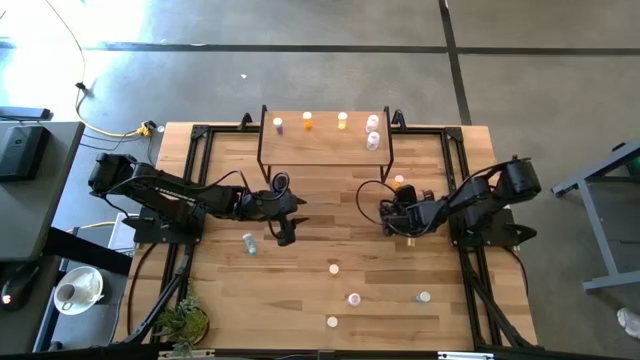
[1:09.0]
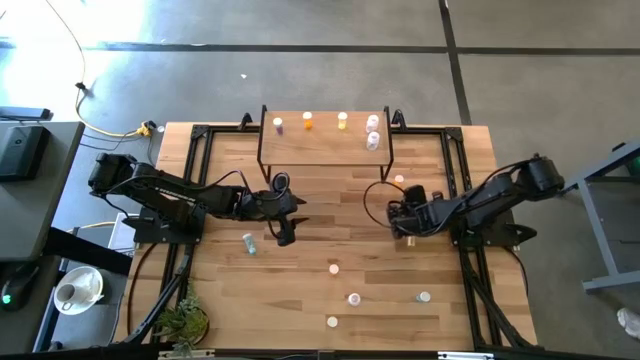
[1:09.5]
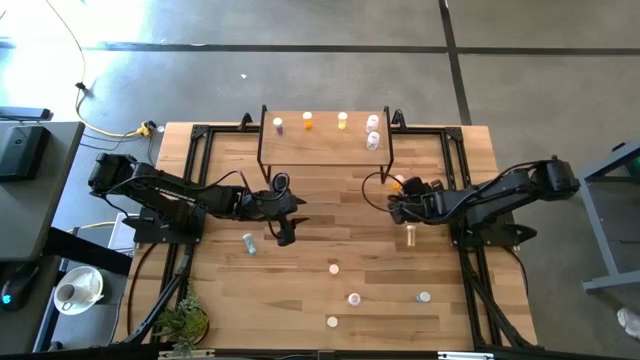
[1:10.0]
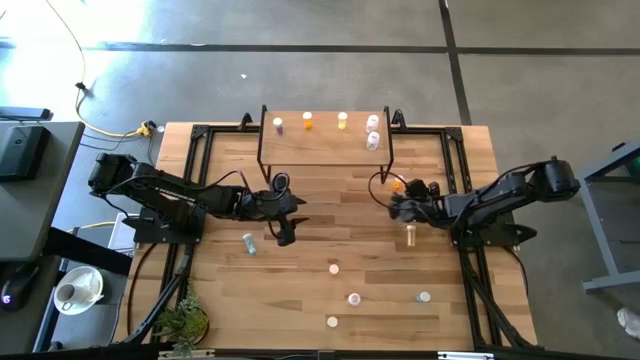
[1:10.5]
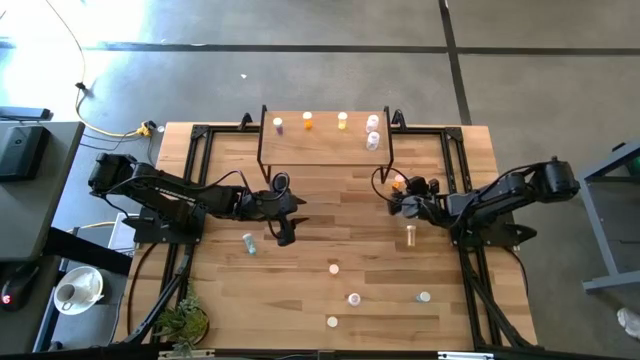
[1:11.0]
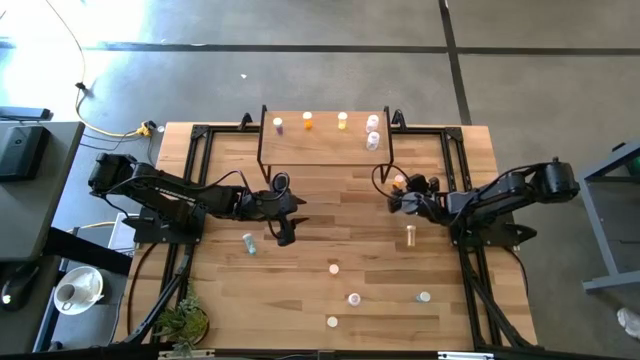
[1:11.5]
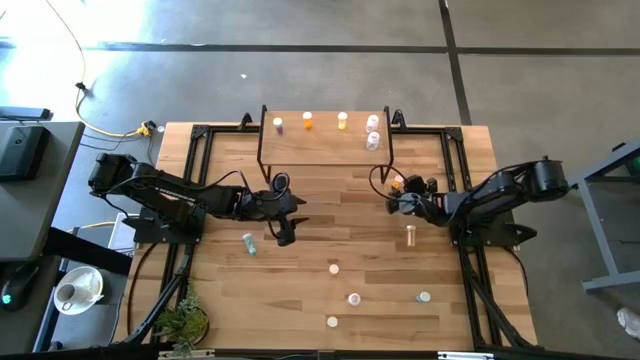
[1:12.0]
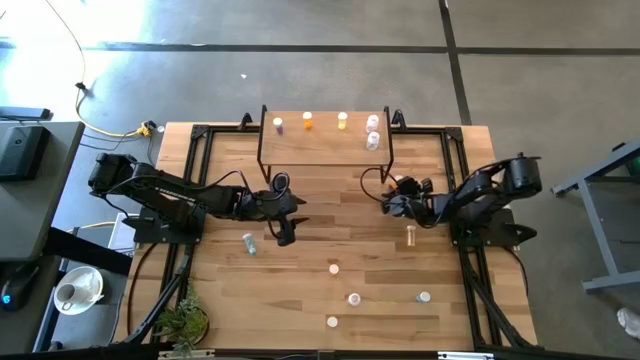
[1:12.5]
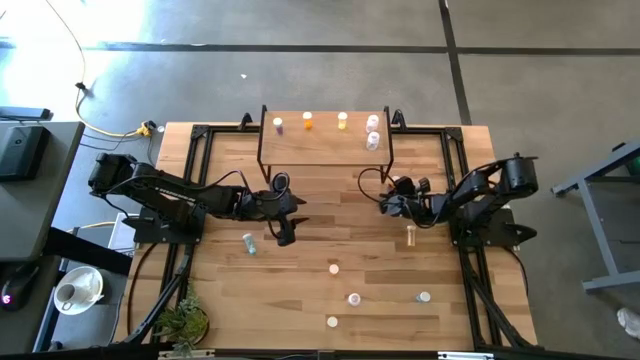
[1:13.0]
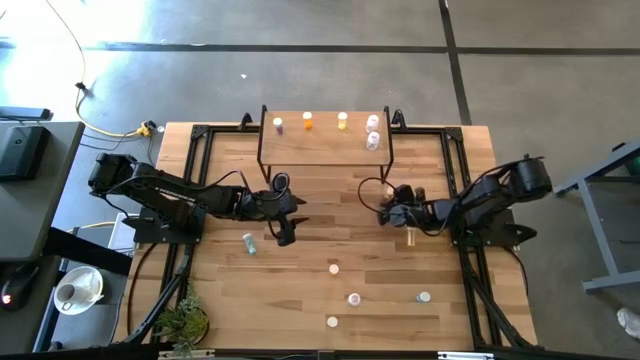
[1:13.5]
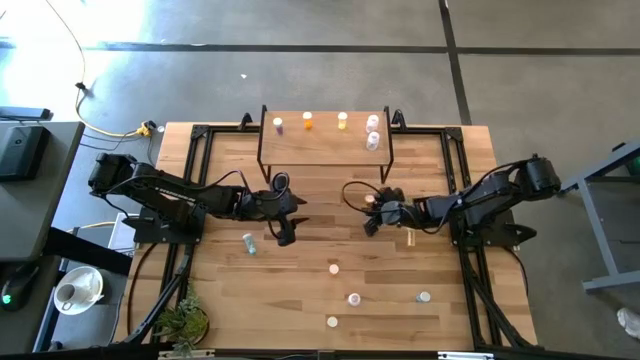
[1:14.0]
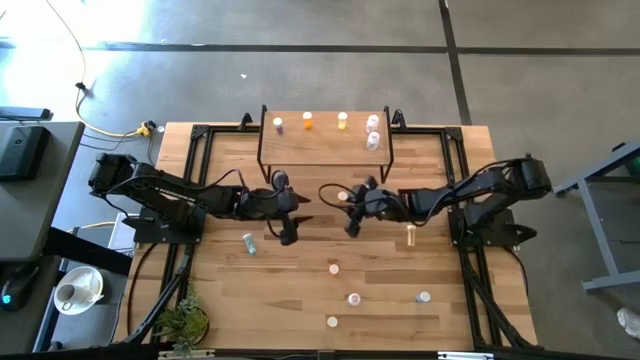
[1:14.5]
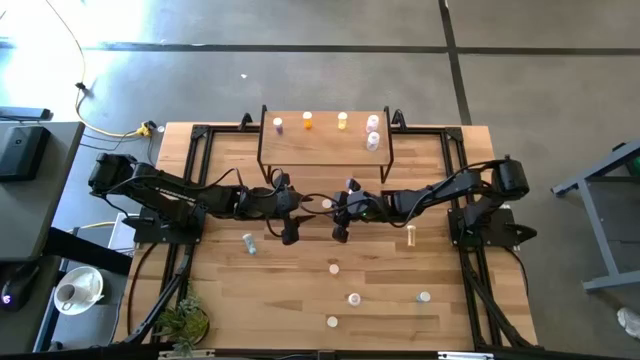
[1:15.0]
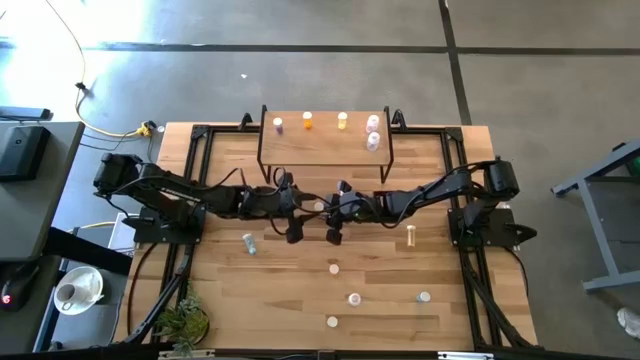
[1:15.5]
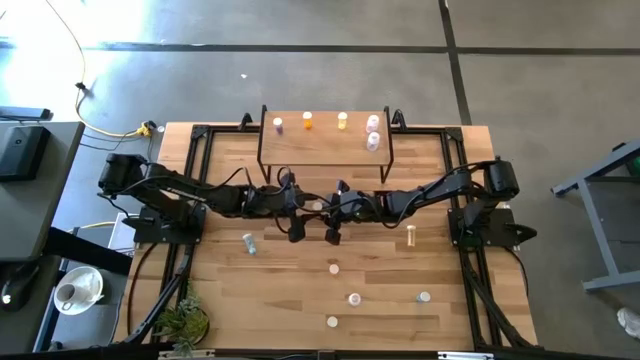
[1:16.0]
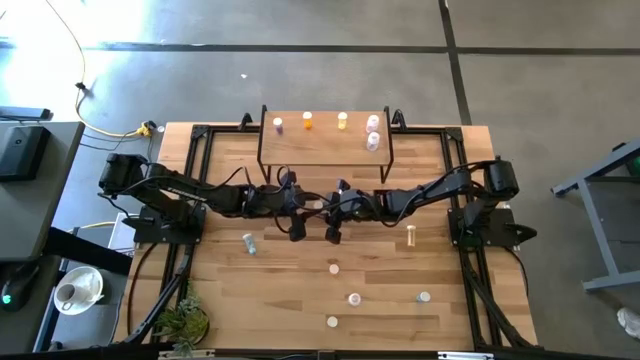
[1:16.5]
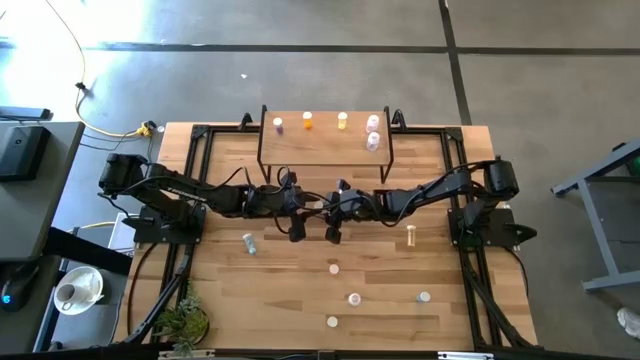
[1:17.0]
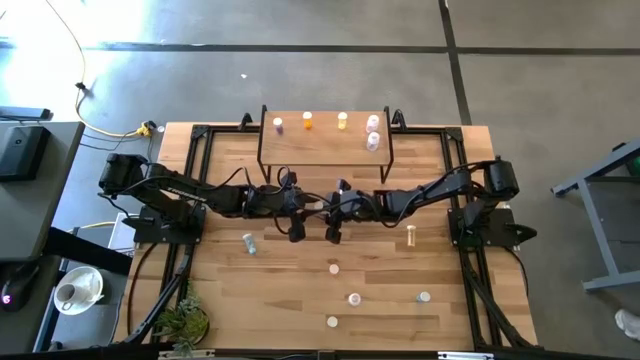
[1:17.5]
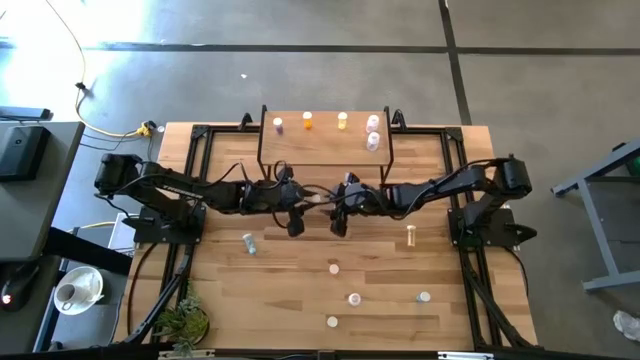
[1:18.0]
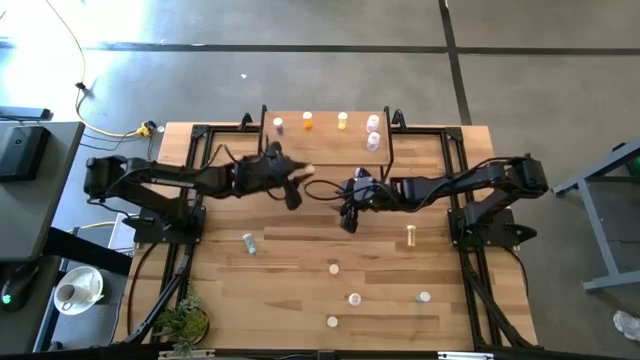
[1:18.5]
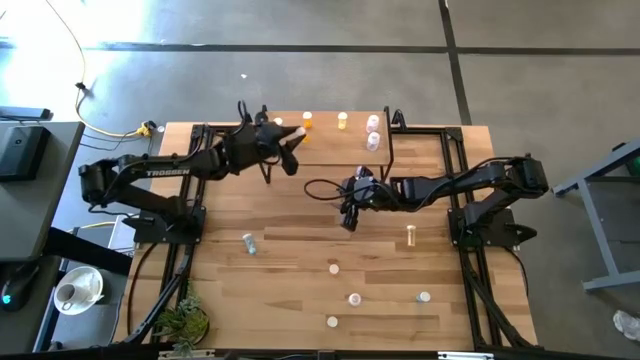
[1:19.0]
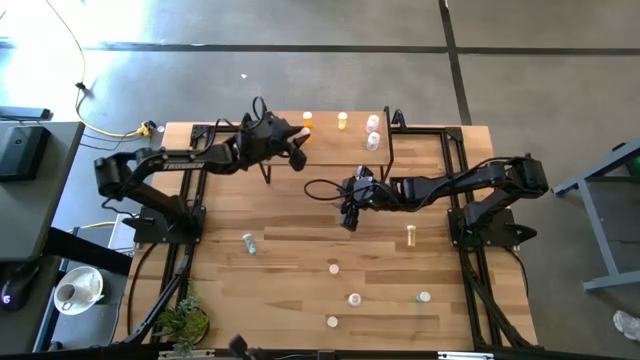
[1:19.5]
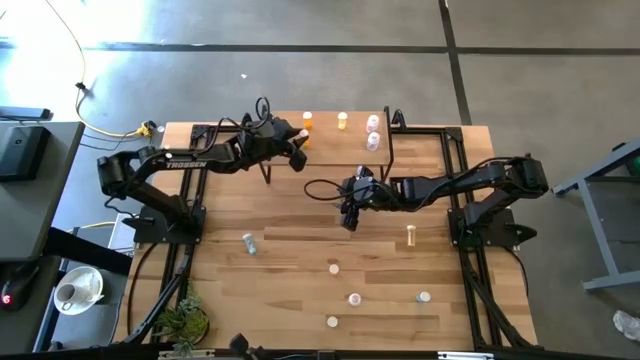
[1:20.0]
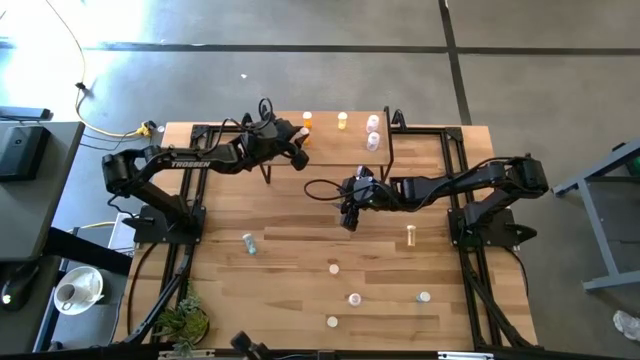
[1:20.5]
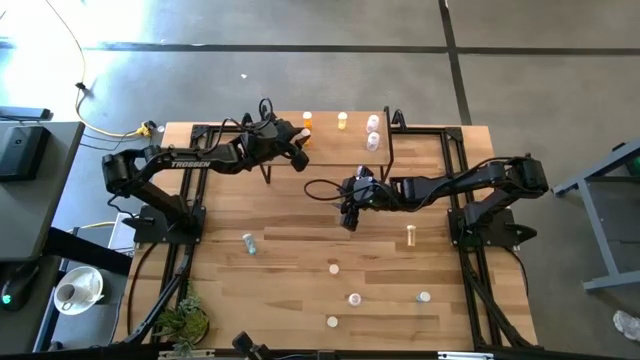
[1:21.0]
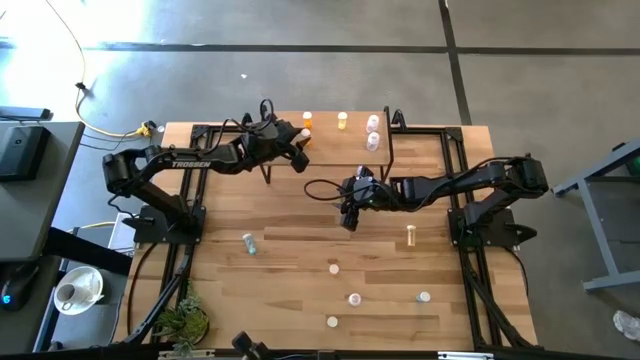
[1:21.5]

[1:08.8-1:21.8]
Task: Pick and place medicine bottles onto shelf by color
Put the top orange pill bottle on the shelf aligned with the other orange pill bottle

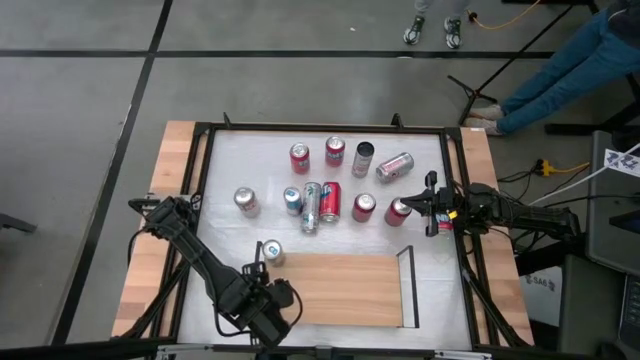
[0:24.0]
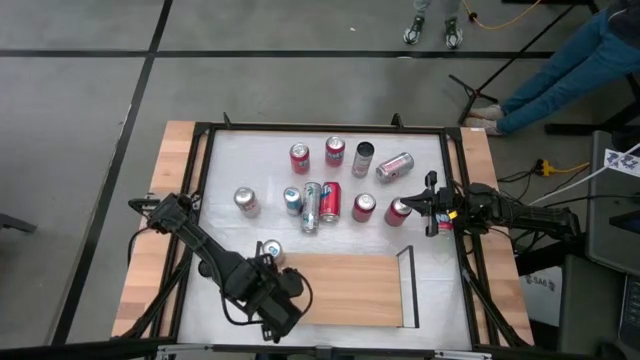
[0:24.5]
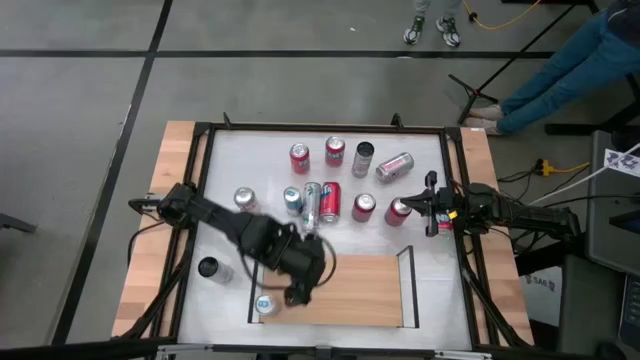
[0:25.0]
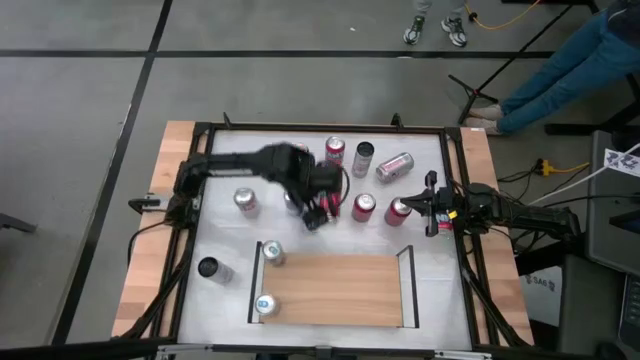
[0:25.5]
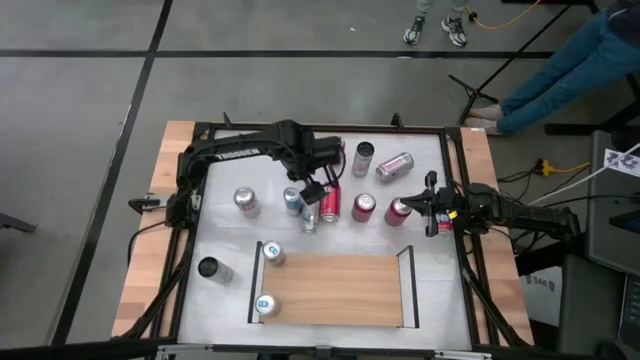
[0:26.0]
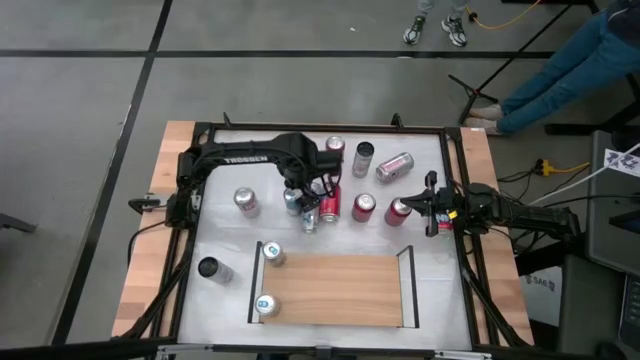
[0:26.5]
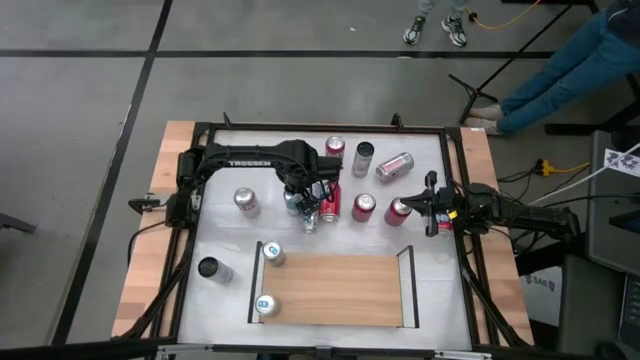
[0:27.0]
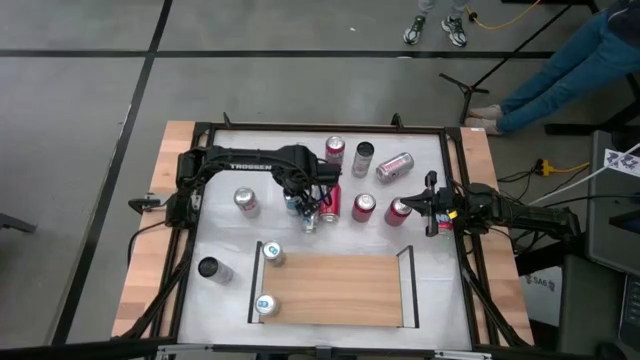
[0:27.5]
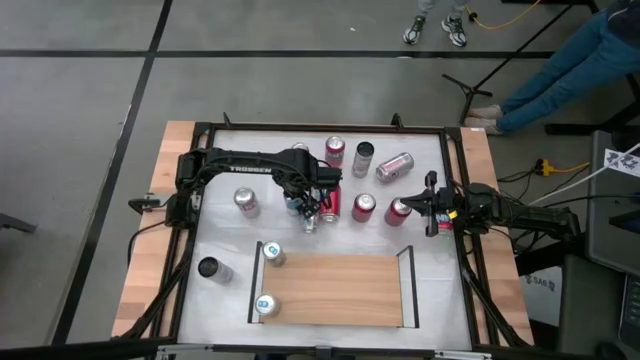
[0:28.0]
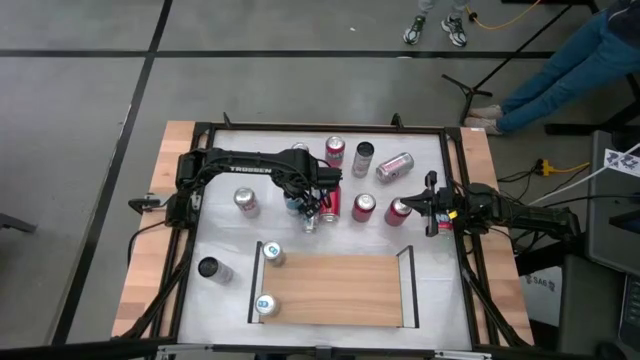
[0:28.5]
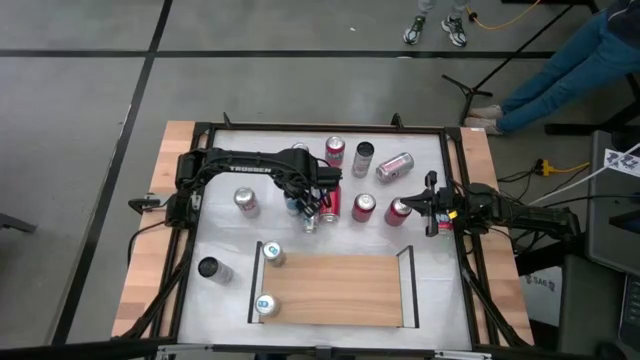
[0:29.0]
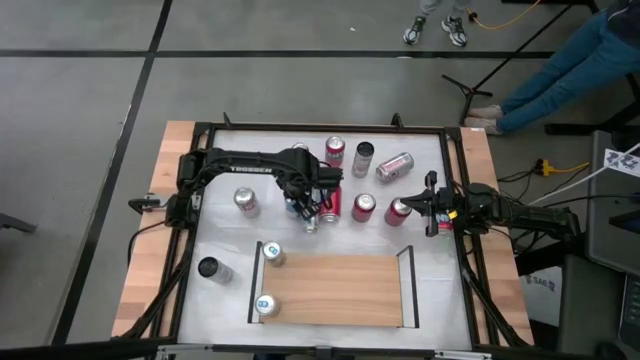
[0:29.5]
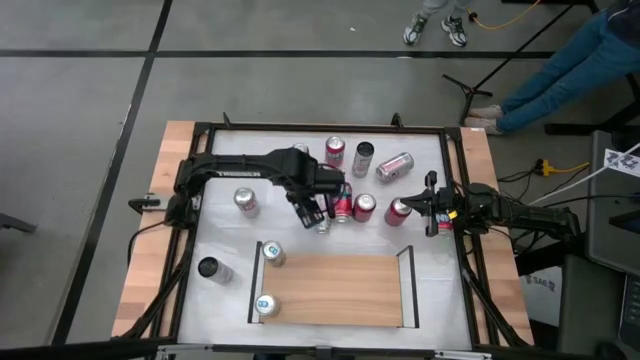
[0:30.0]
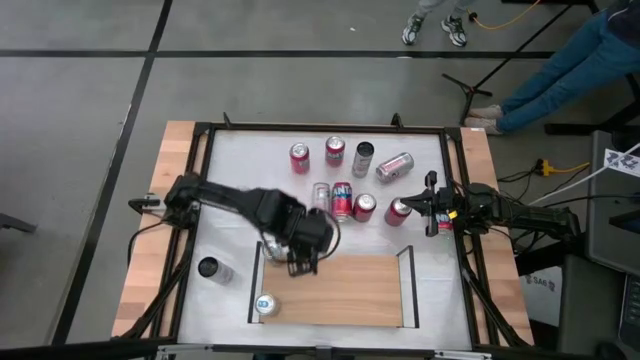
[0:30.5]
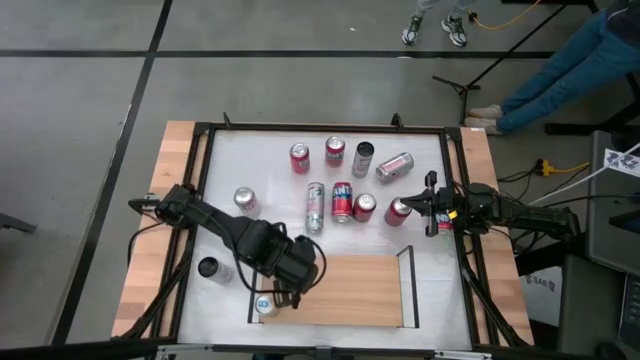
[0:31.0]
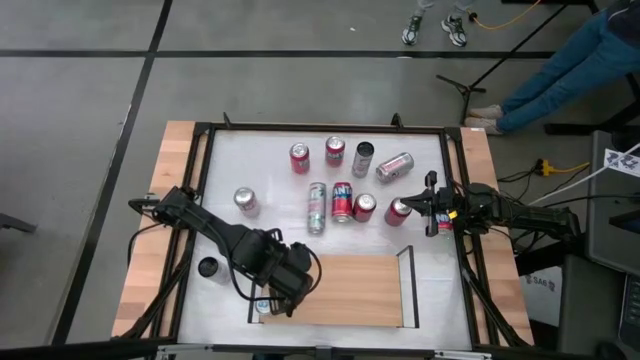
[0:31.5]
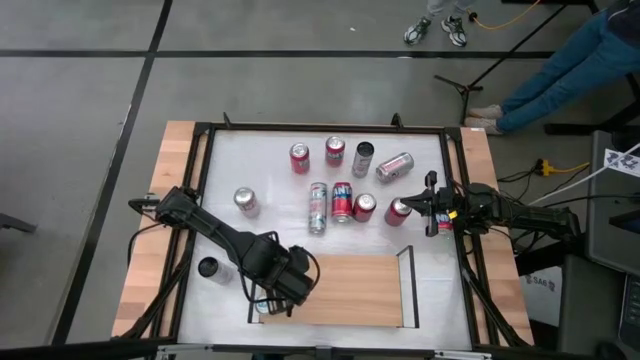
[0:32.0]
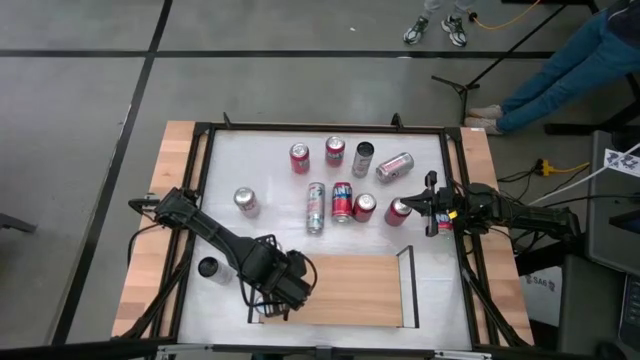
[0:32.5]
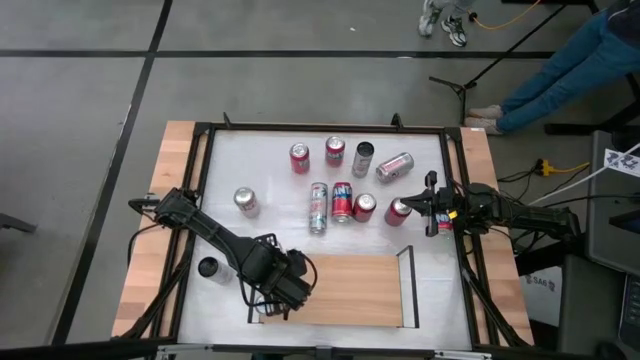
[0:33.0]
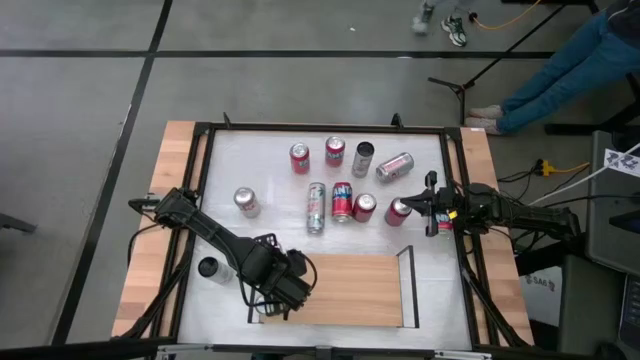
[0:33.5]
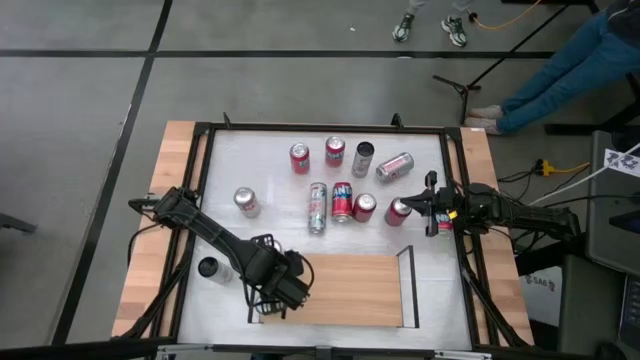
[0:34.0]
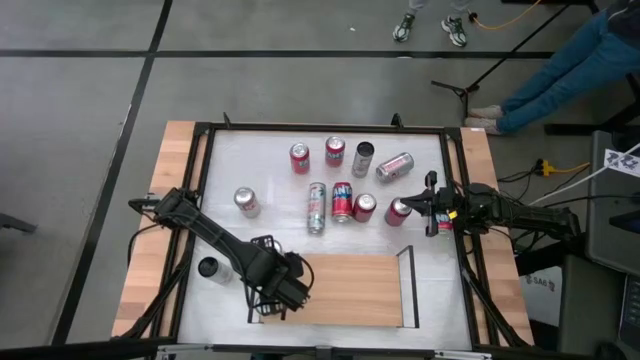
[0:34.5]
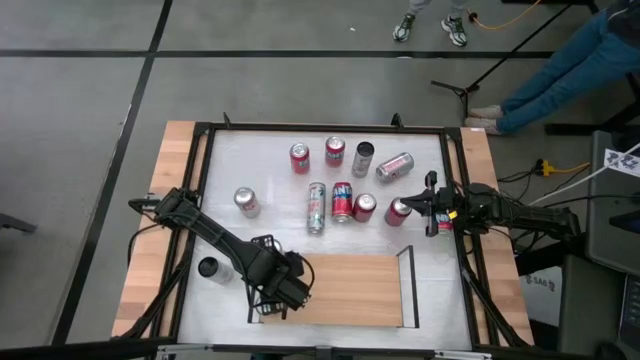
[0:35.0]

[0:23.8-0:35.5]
Task: Place canned beverage on shelf
Put the blue soda can on the shelf aligned with the other blue soda can
